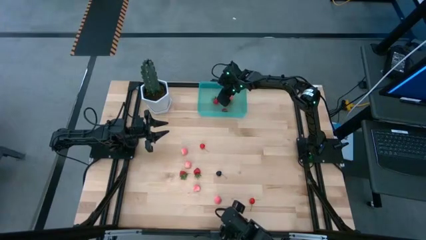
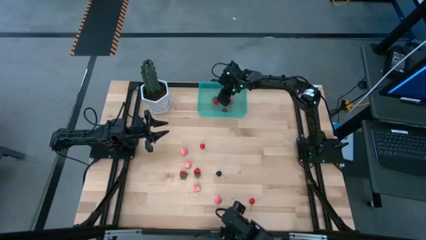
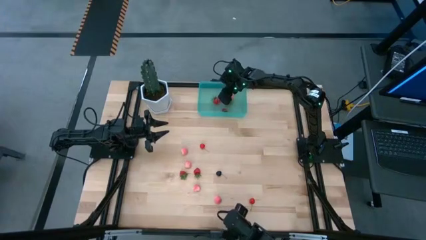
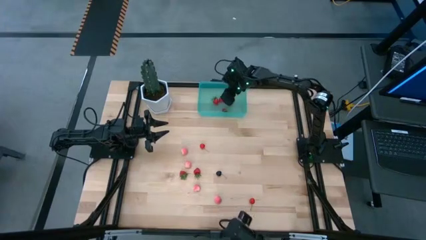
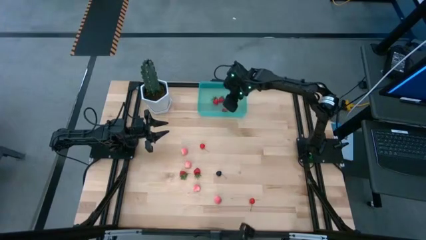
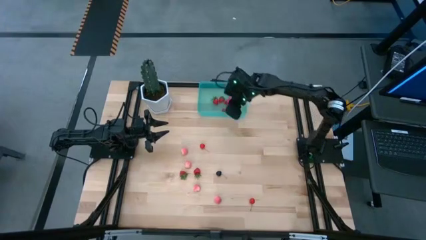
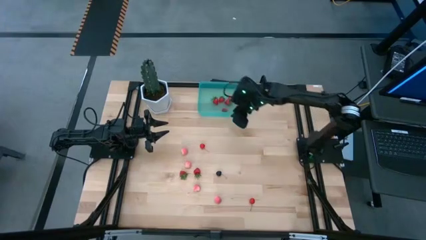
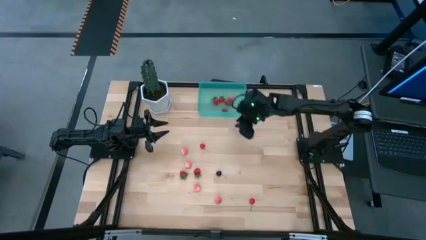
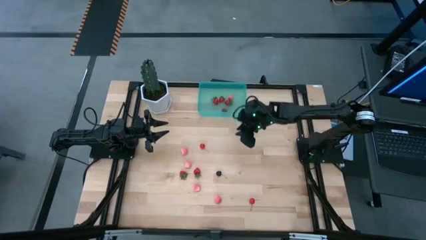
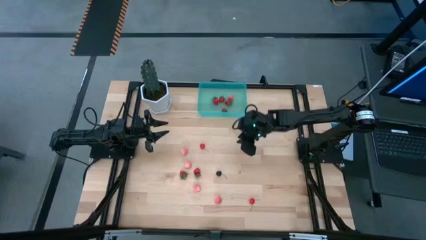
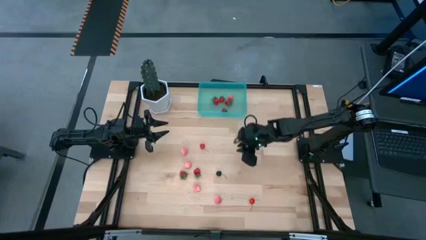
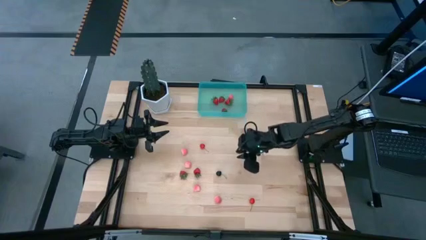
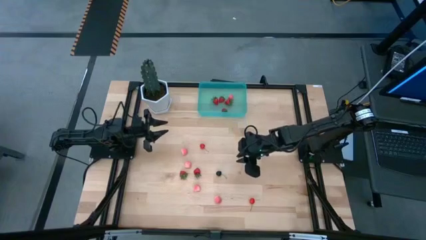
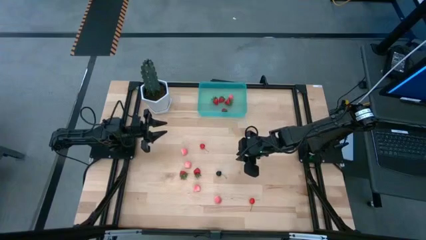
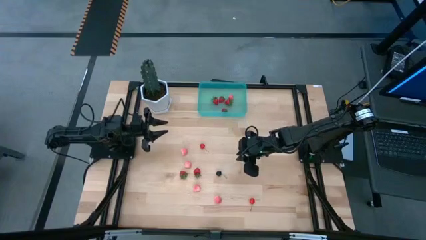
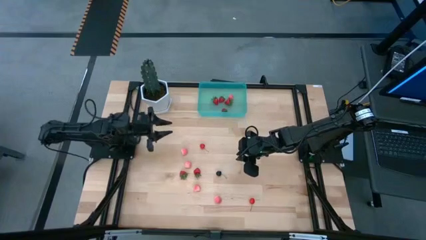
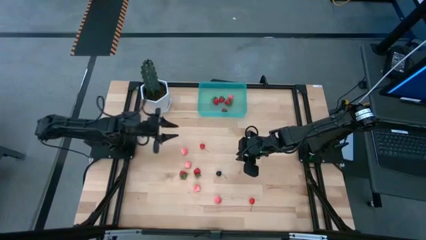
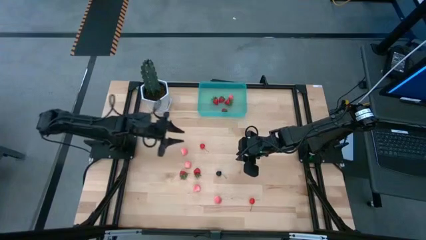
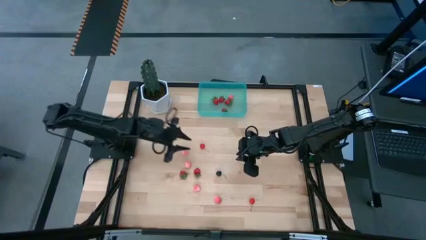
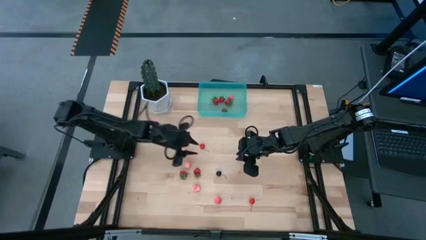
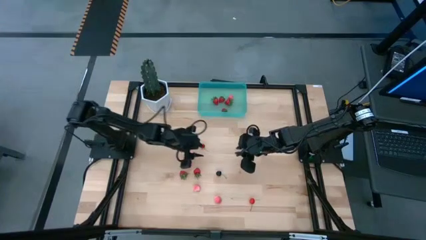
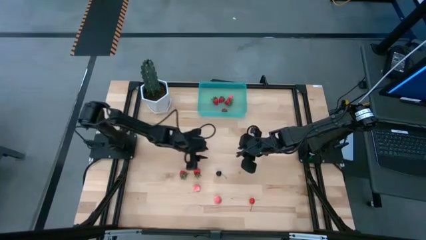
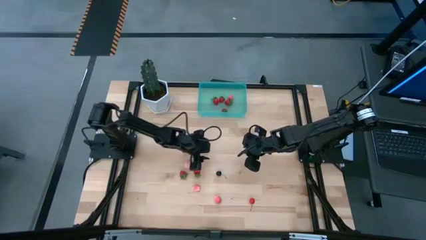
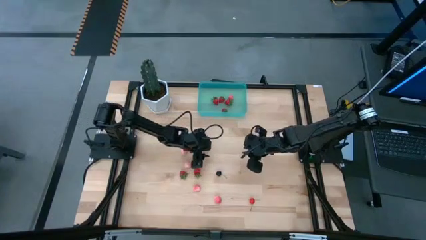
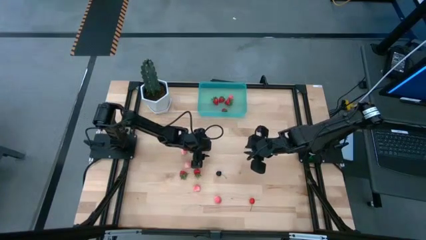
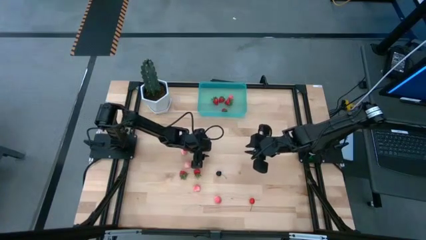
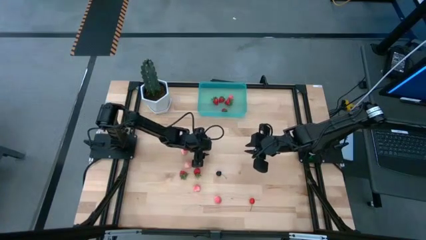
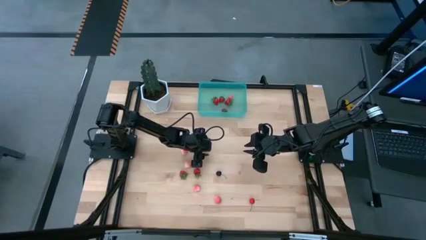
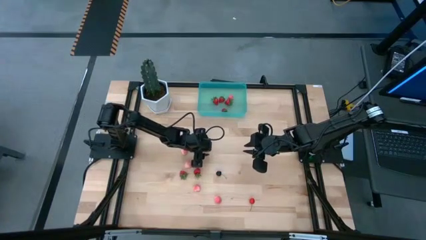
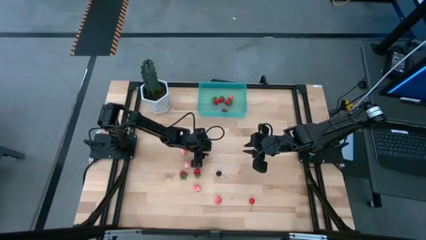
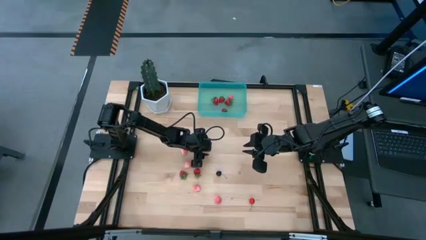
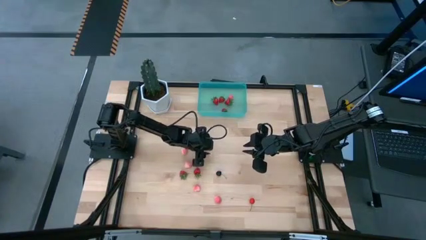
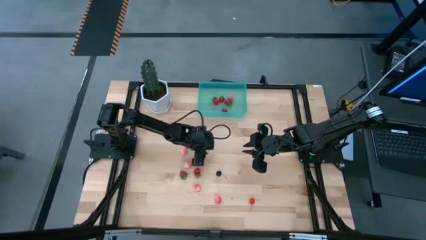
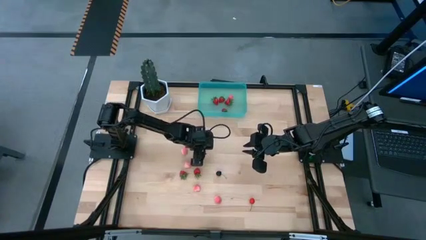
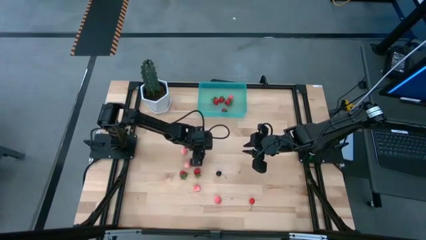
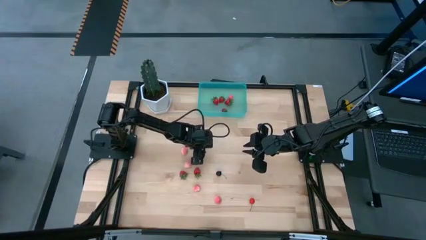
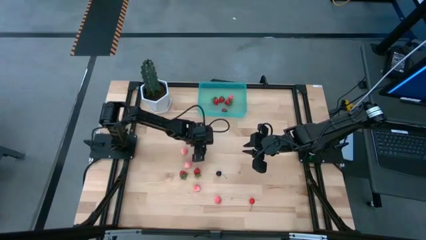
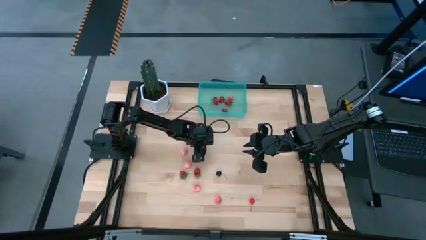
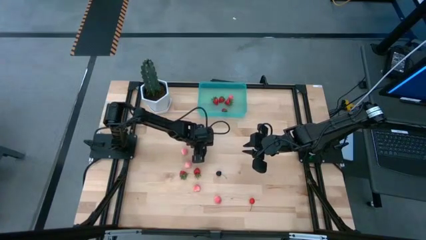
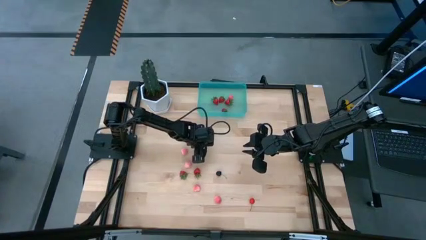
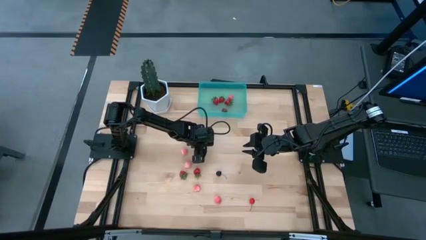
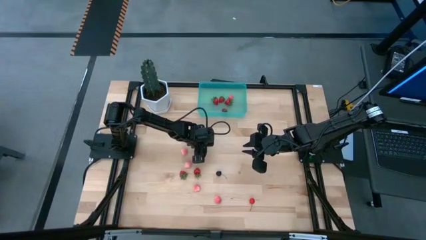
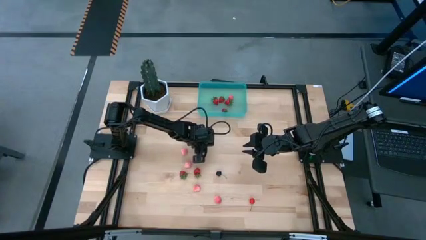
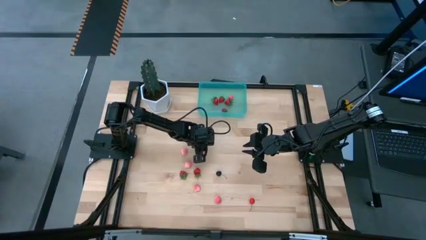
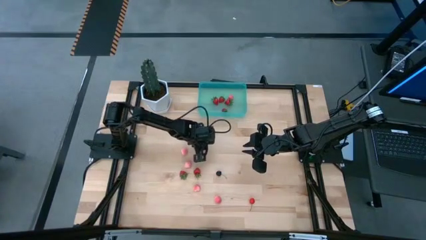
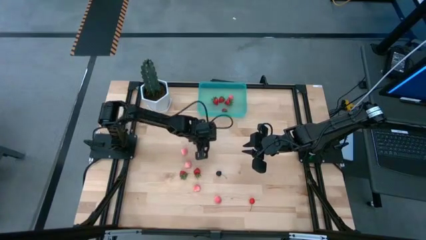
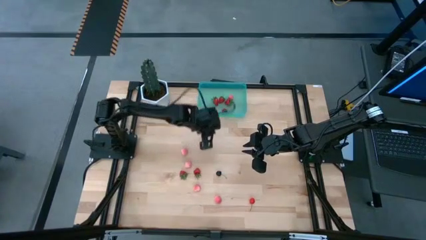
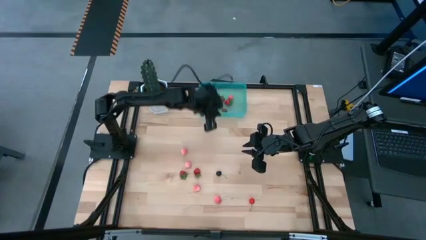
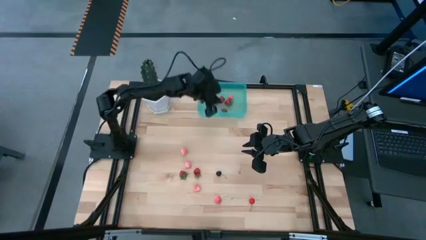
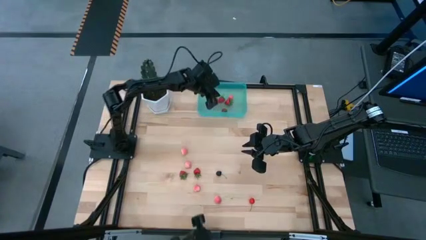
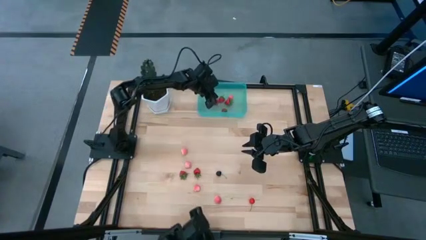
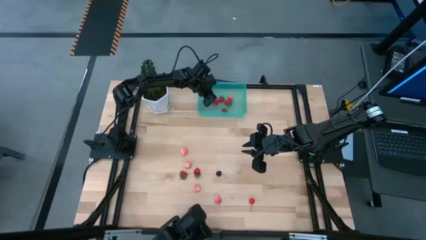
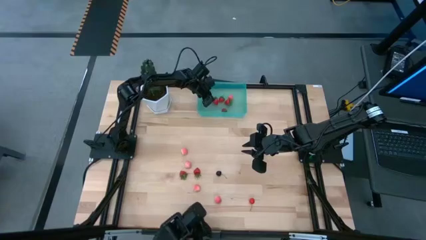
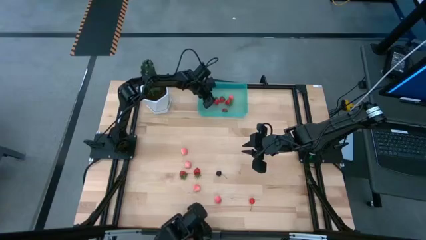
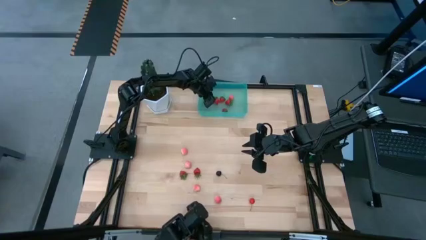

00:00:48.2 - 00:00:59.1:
Task: Pick and placing Produce into tupperware
Put the top red cherry into the container

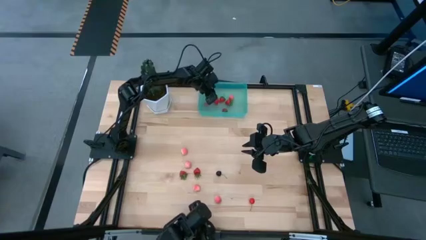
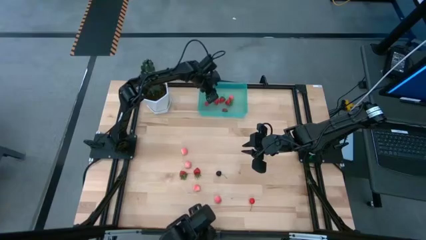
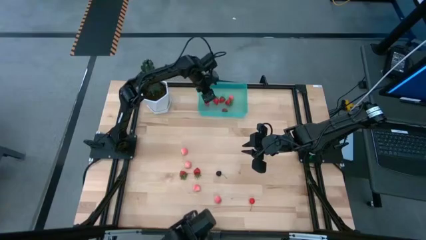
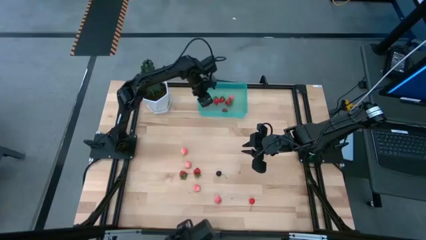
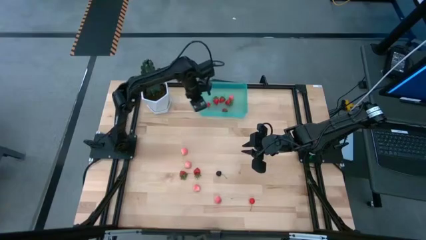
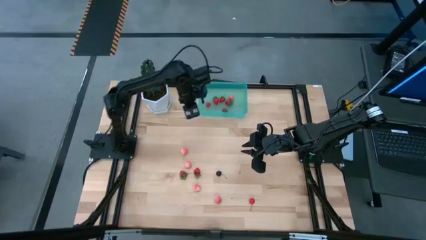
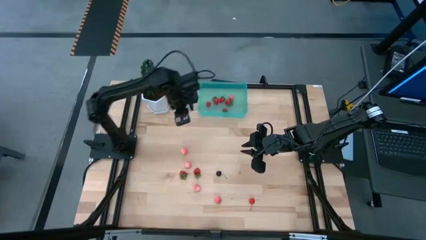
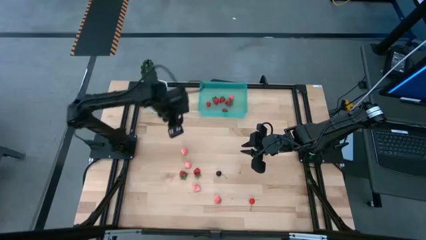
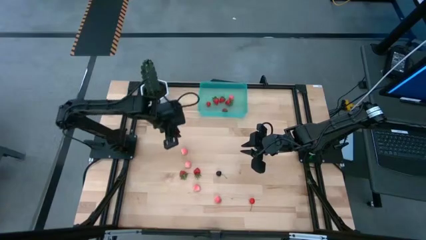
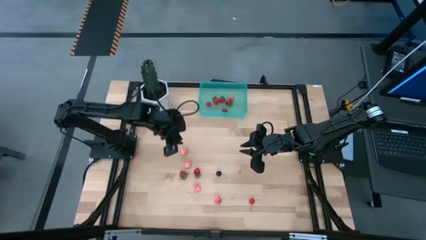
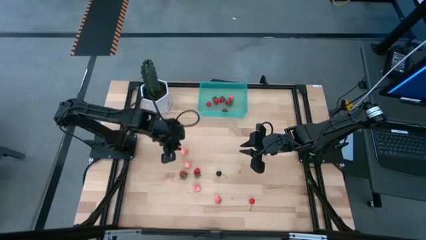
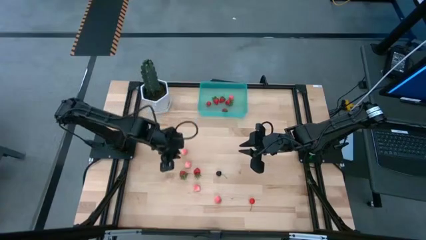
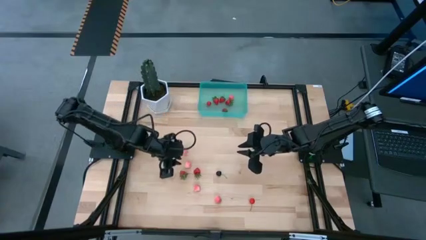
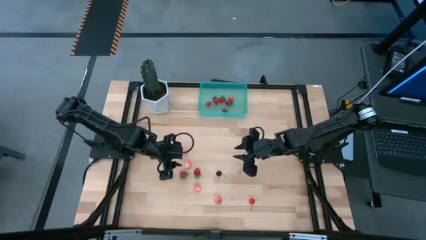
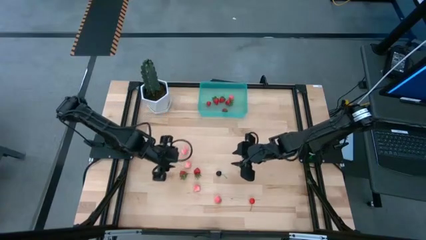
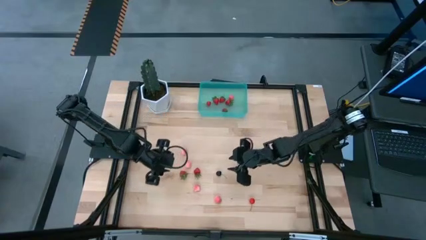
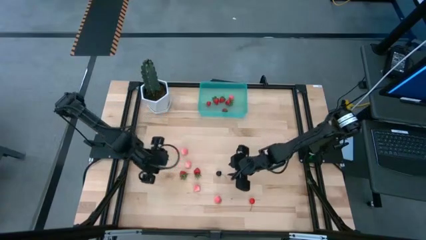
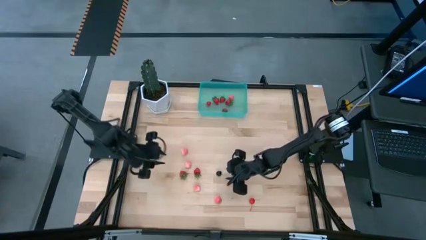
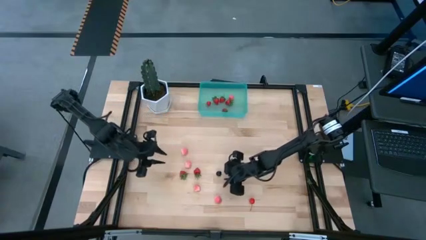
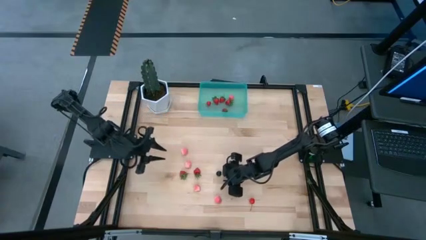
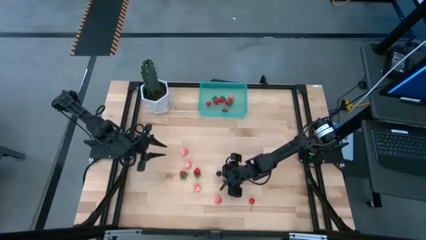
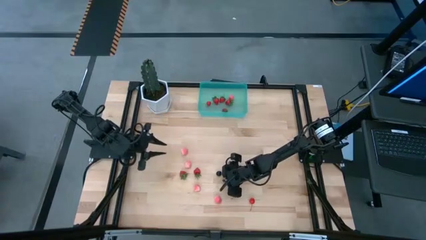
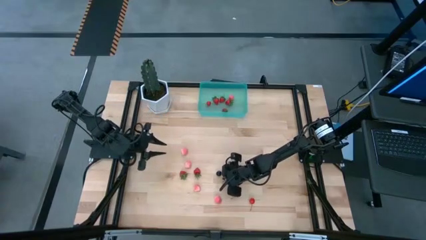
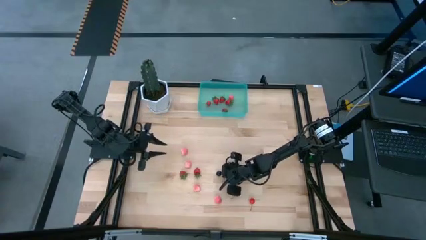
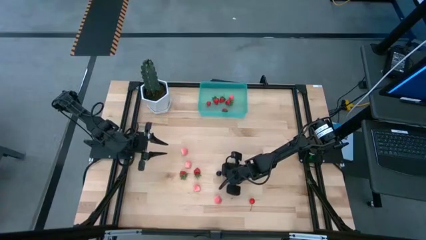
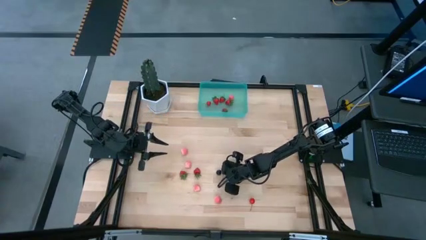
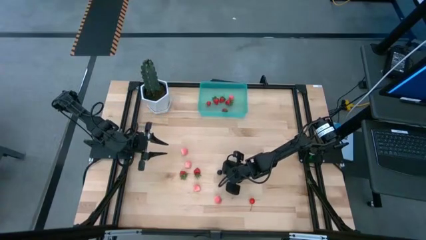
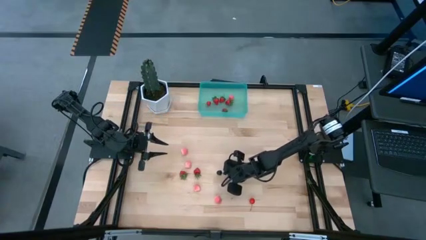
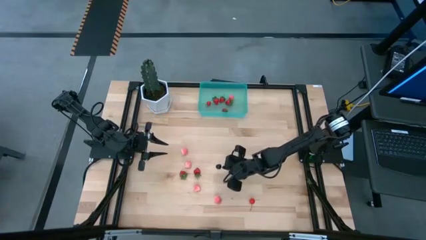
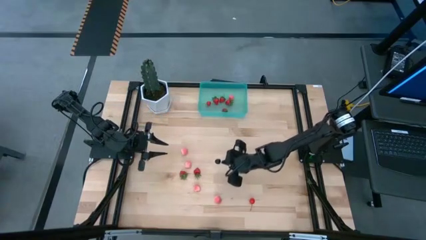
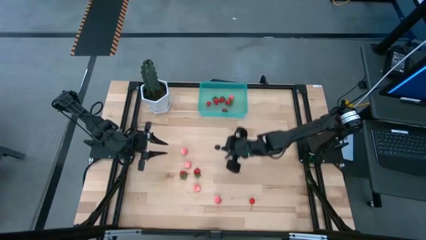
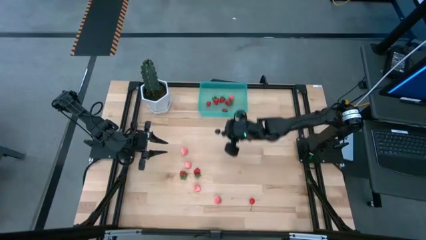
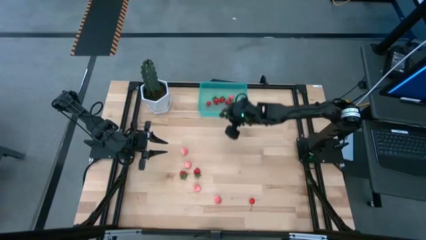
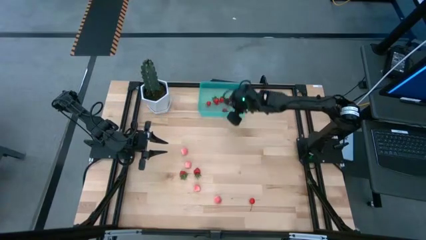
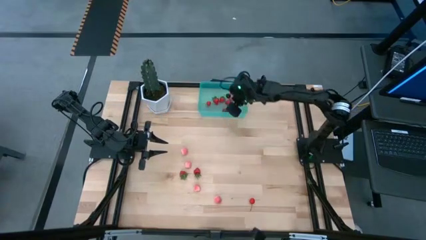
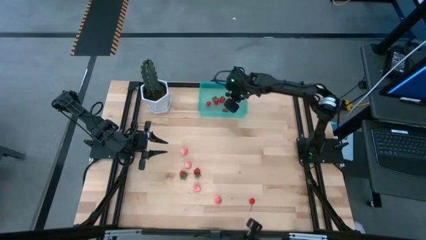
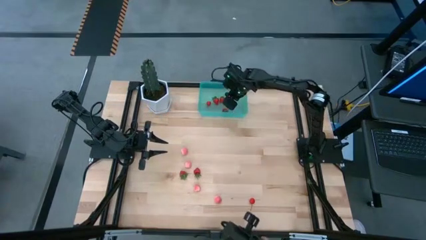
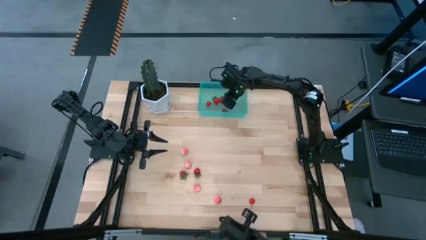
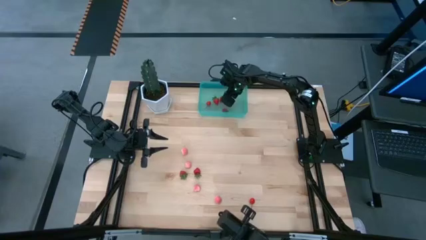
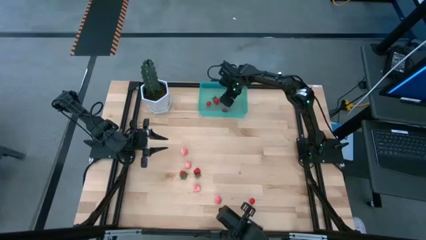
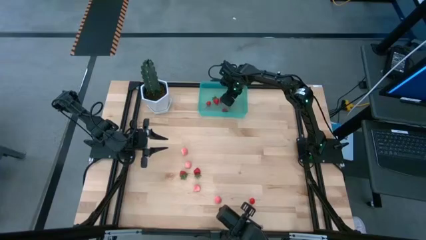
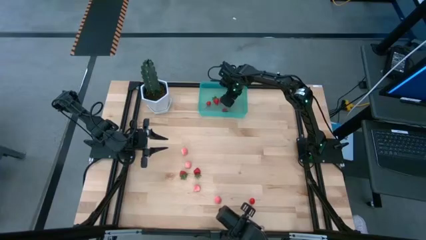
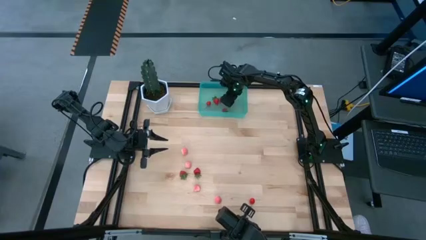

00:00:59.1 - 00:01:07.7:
Put the black cherry into the container
